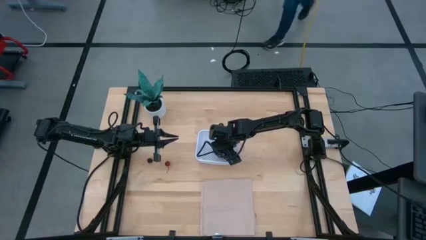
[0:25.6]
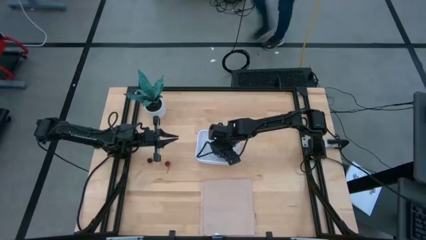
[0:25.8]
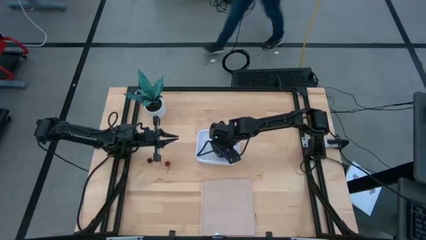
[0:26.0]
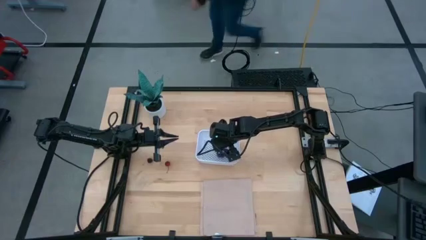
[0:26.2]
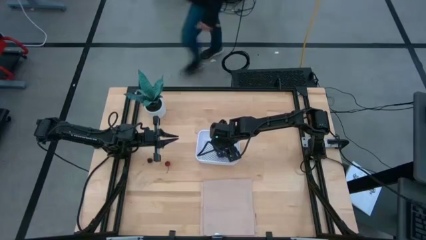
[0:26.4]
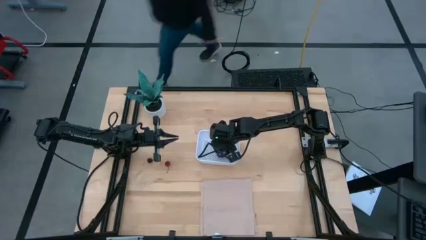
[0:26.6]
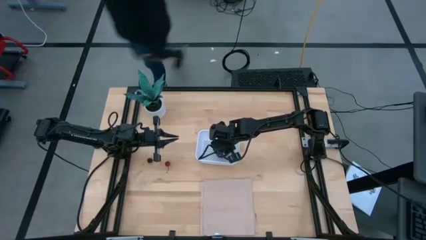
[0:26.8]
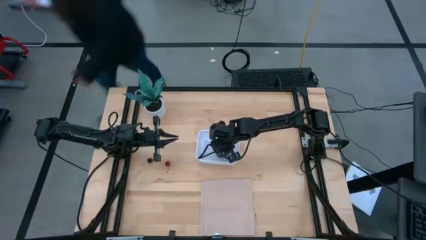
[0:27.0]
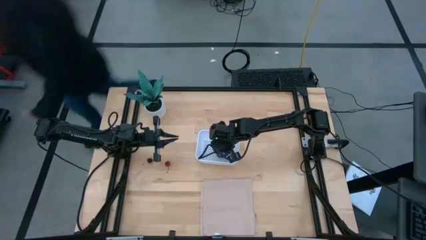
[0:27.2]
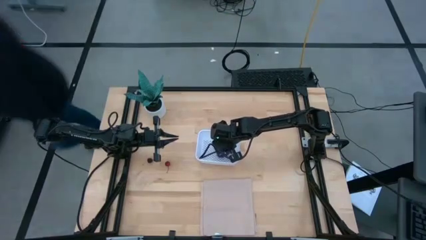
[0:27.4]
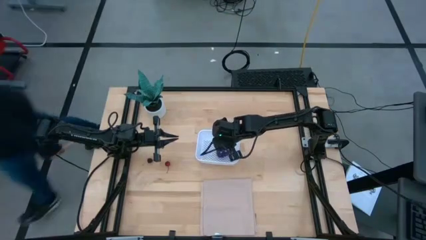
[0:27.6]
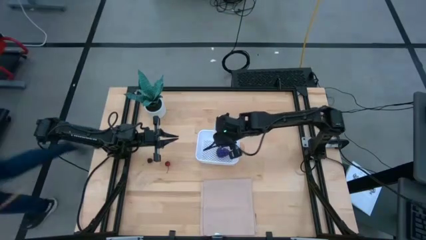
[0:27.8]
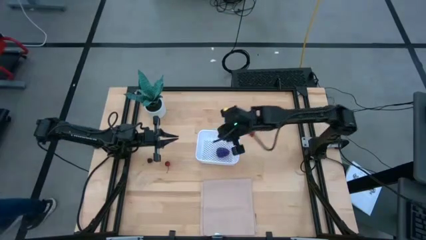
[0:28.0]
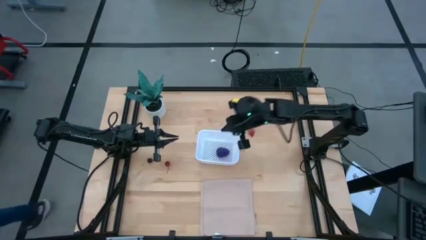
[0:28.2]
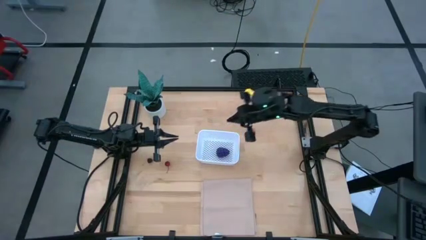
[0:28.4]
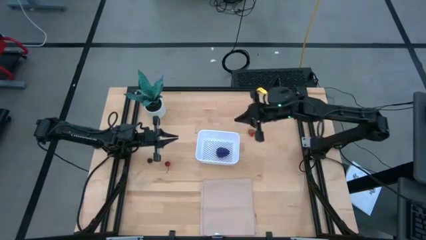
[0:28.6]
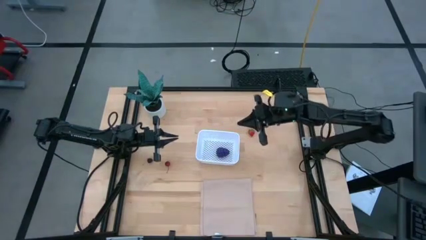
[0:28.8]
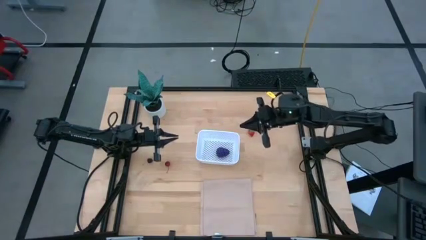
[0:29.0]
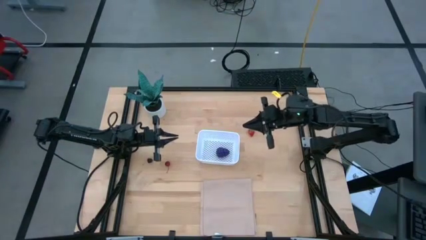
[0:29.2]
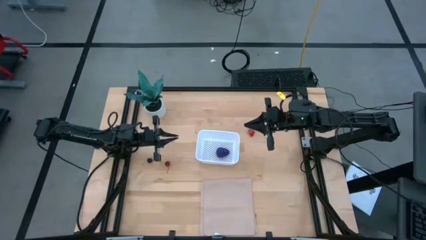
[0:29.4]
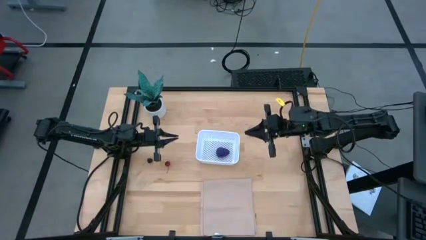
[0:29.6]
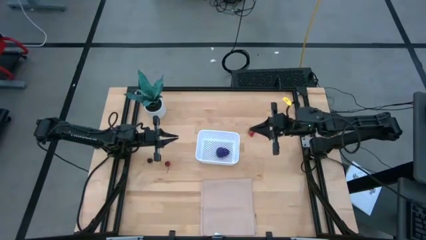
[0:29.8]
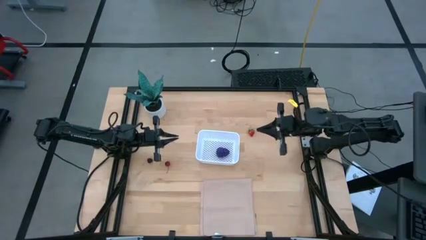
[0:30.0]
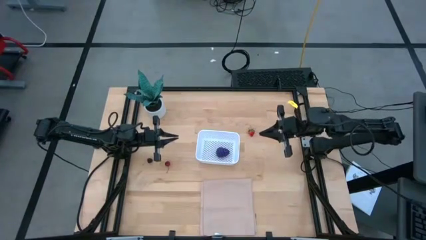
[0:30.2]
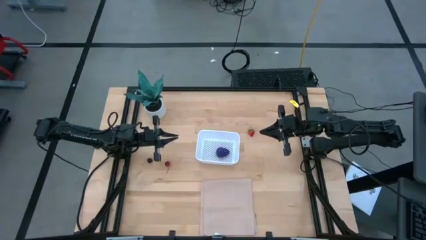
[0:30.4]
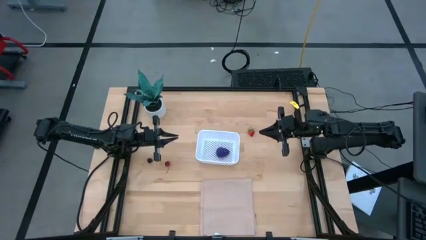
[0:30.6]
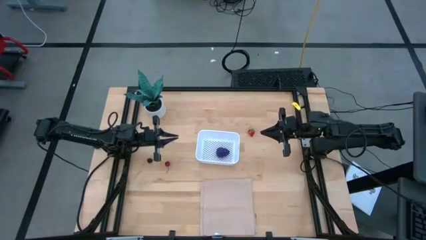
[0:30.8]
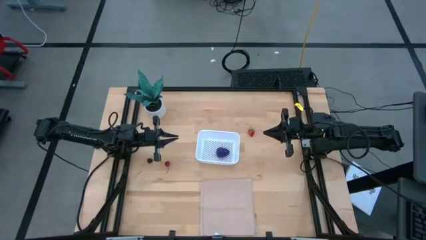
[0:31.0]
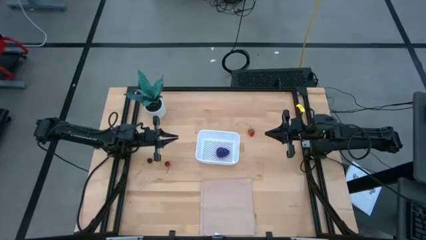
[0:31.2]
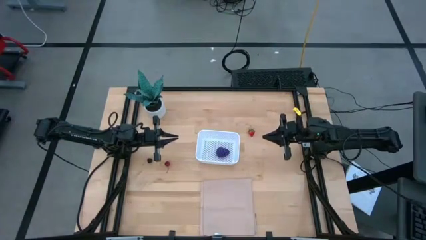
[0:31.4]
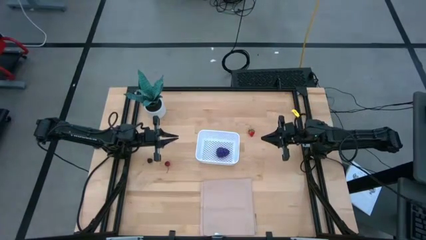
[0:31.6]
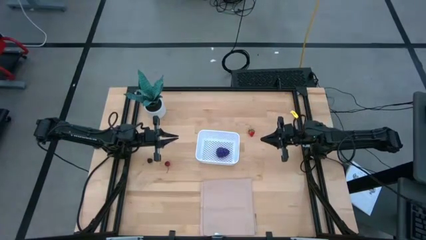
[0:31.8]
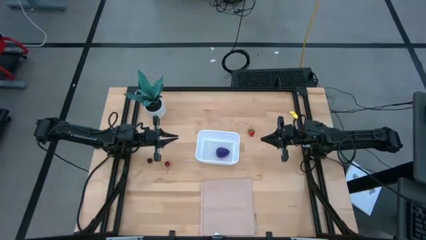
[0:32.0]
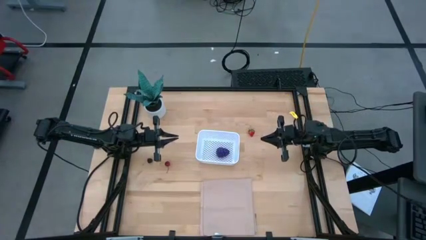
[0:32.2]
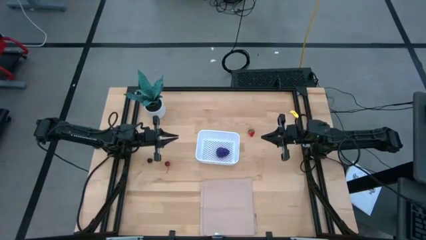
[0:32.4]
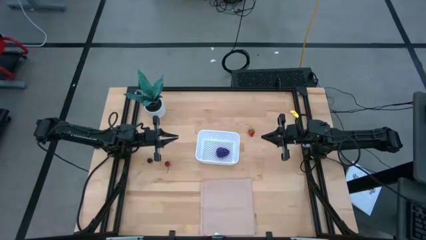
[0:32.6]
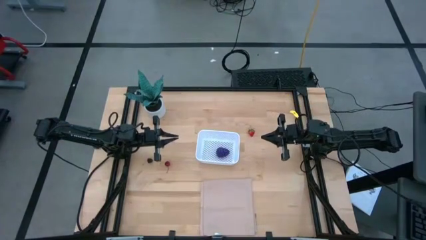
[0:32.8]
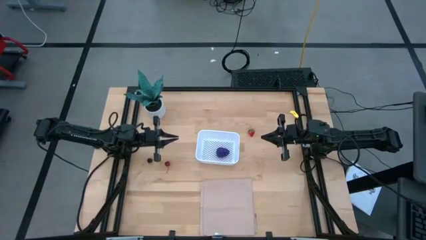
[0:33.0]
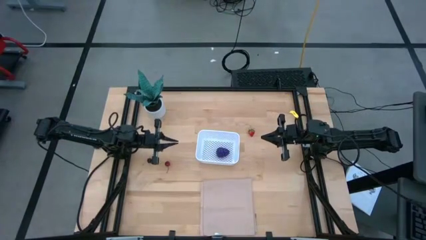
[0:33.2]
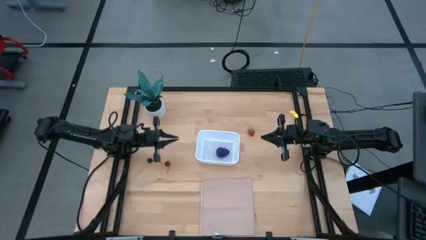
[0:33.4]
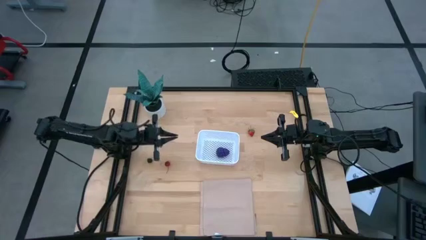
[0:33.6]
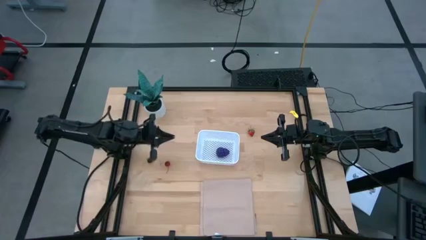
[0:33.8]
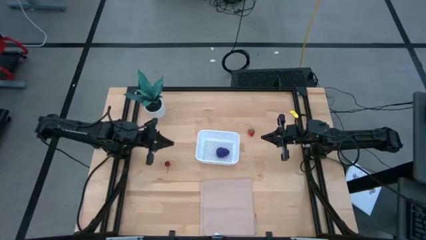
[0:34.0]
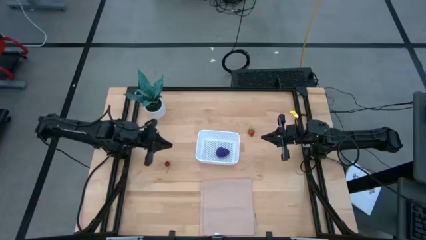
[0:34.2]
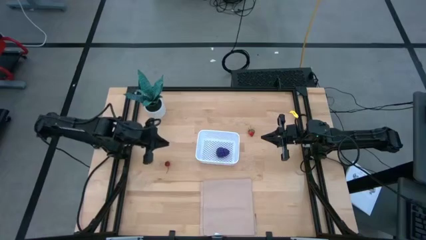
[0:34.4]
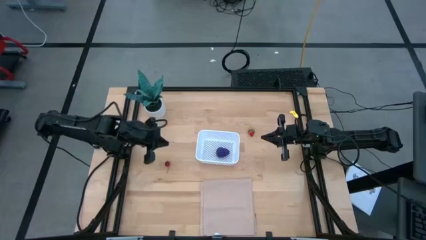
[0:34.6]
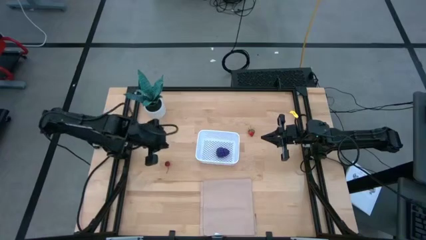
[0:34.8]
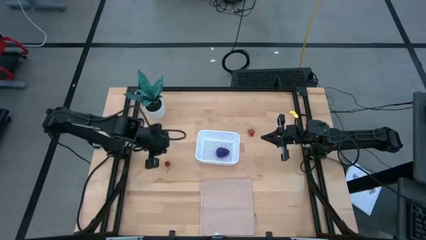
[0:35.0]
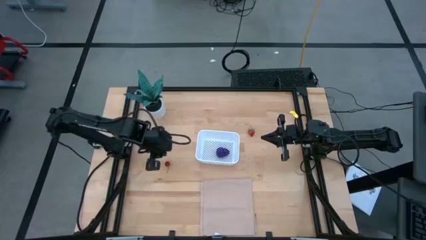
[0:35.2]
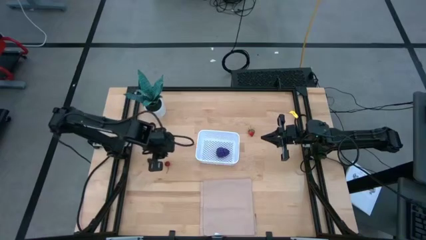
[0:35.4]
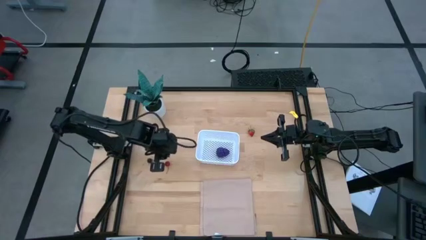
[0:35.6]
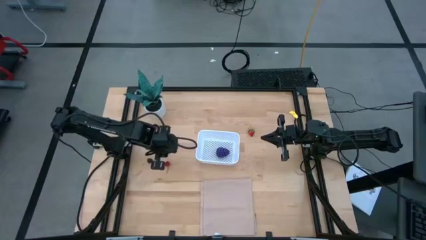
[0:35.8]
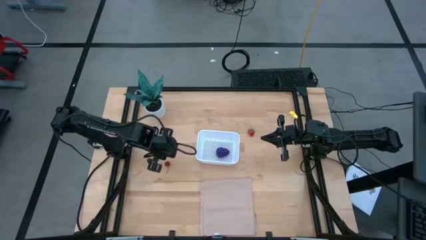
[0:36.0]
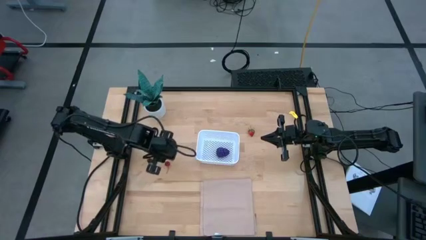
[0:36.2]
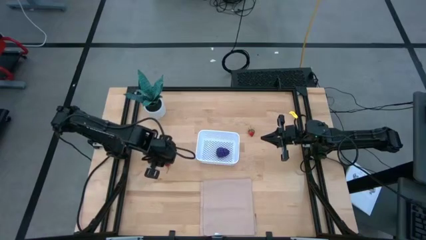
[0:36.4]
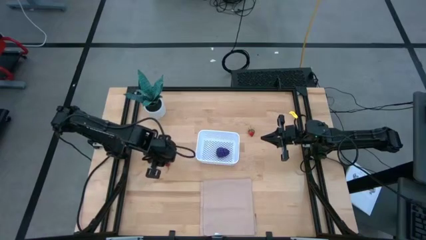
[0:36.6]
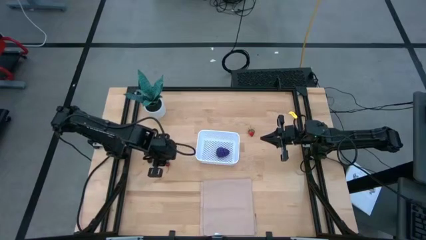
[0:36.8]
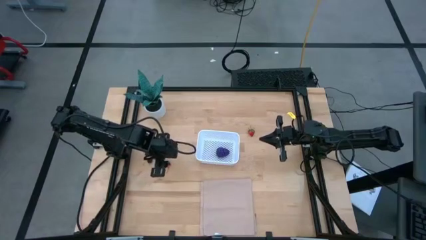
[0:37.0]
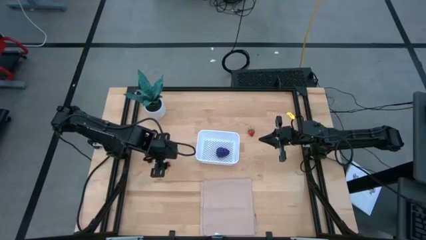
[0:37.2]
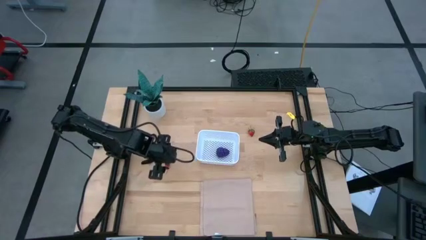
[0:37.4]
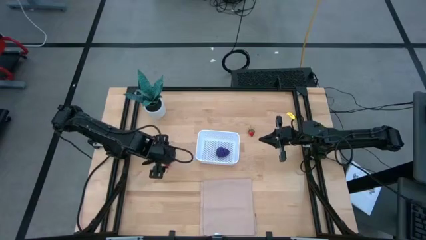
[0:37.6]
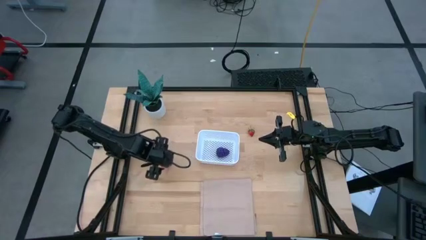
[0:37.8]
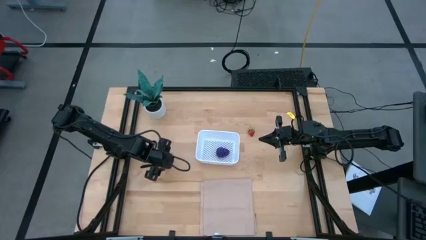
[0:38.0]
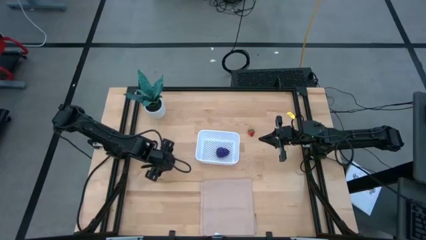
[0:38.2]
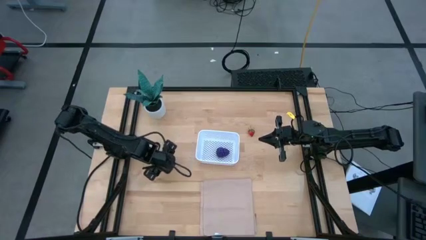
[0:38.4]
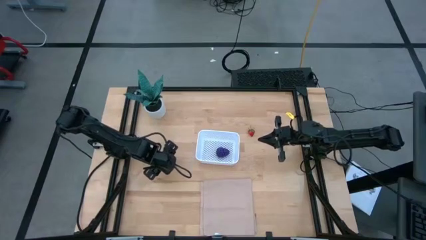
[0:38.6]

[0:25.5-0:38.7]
Task: Pick and placing Produce into tupperware
Put the red cherry into the white bin
